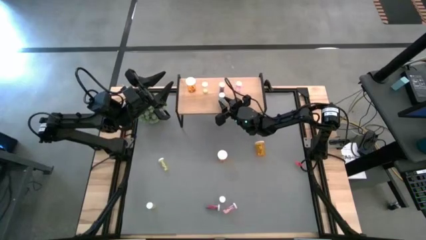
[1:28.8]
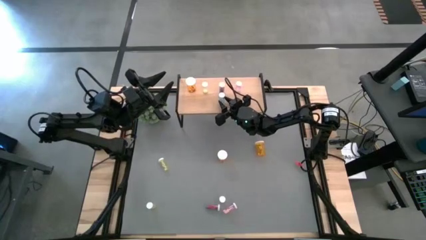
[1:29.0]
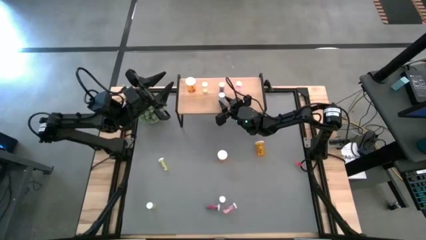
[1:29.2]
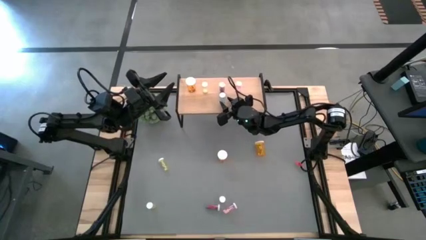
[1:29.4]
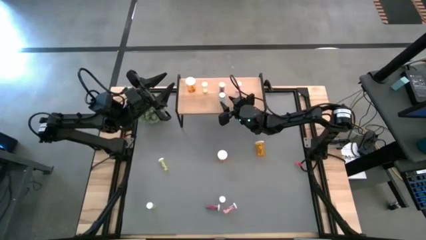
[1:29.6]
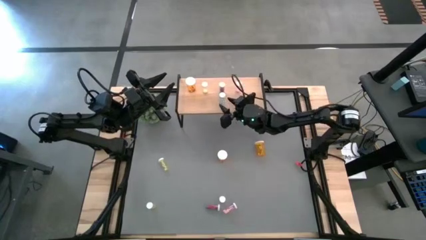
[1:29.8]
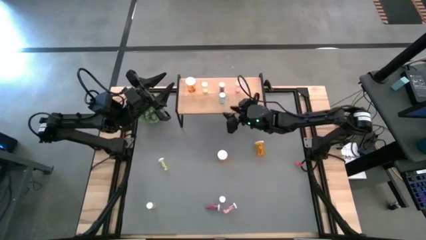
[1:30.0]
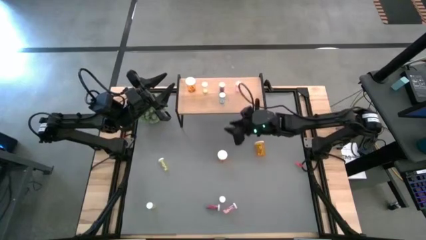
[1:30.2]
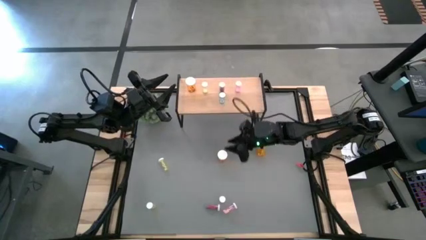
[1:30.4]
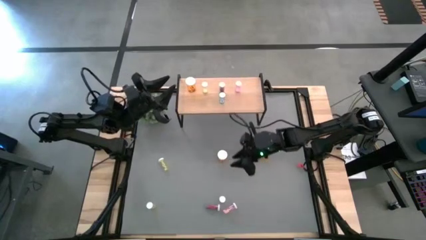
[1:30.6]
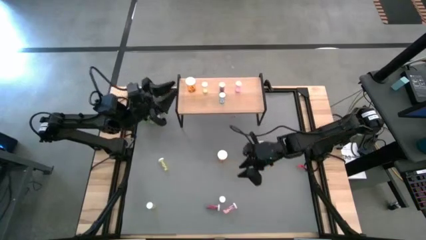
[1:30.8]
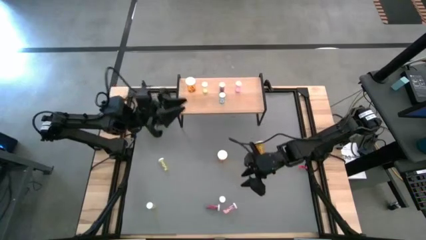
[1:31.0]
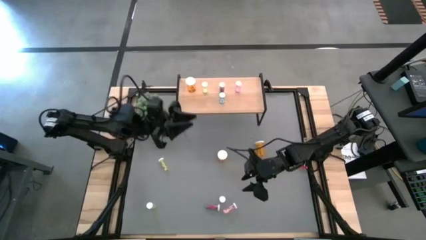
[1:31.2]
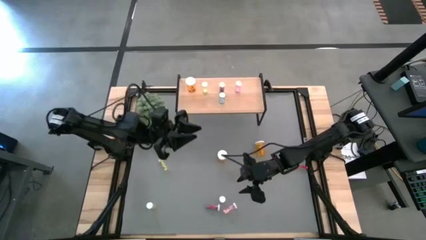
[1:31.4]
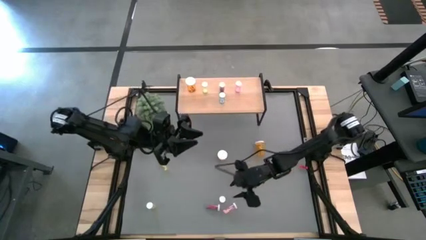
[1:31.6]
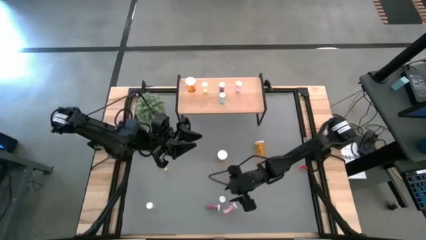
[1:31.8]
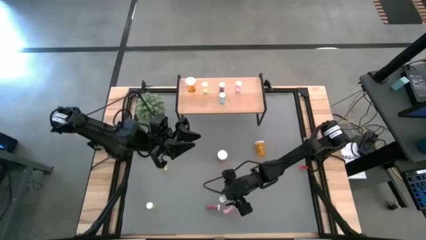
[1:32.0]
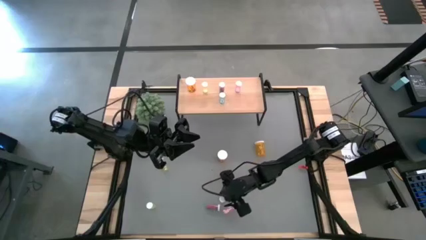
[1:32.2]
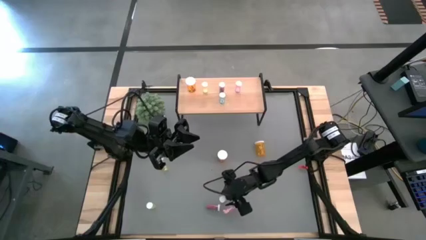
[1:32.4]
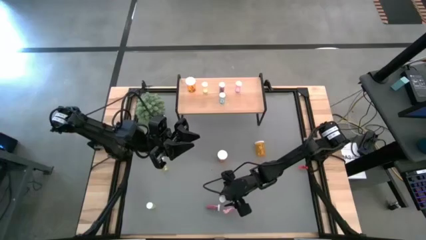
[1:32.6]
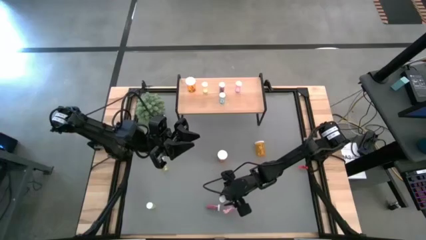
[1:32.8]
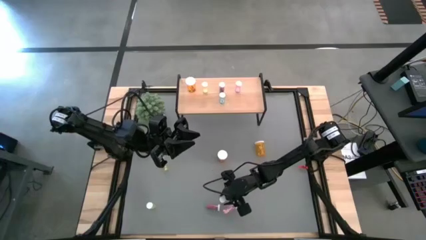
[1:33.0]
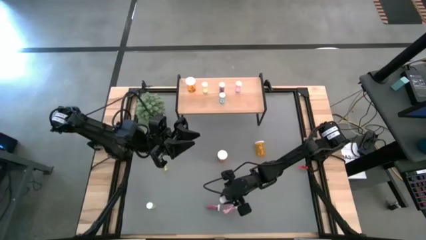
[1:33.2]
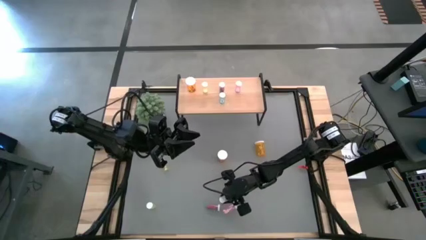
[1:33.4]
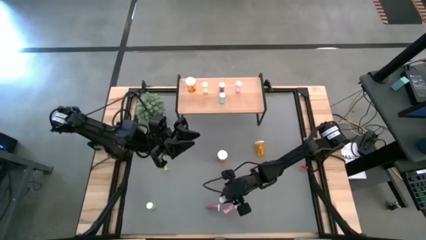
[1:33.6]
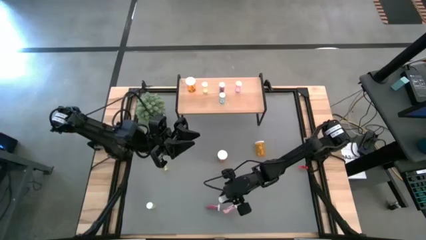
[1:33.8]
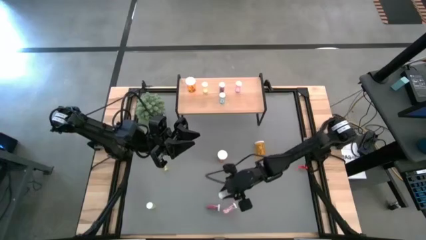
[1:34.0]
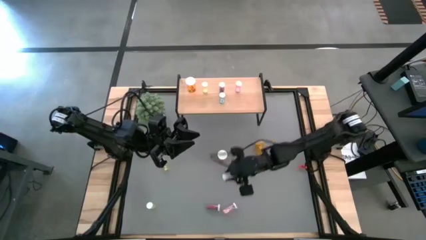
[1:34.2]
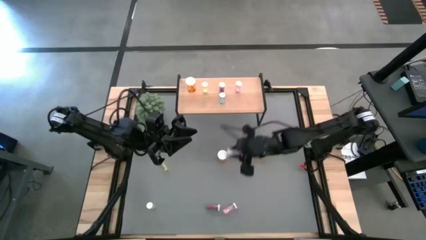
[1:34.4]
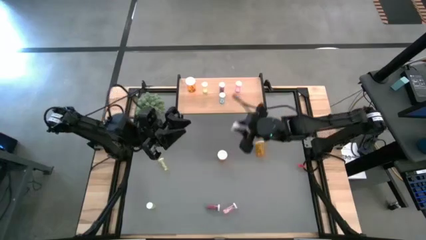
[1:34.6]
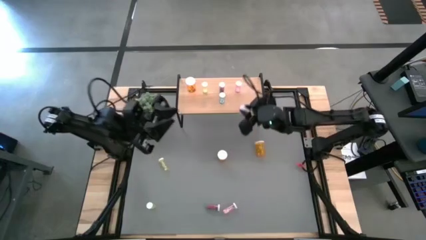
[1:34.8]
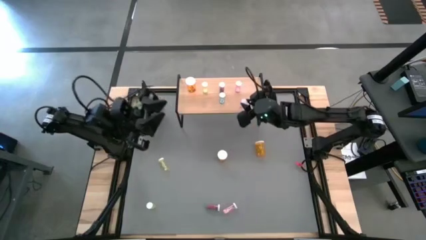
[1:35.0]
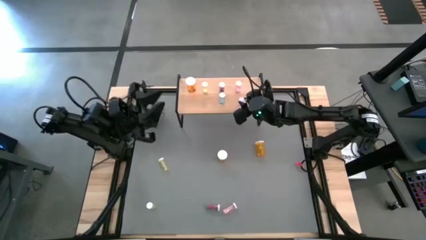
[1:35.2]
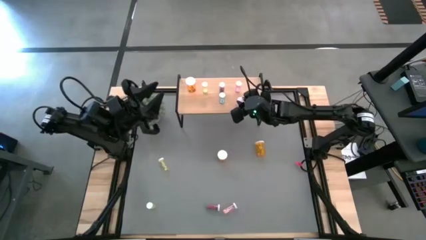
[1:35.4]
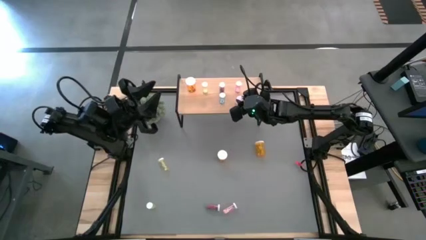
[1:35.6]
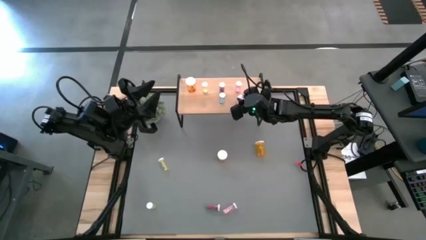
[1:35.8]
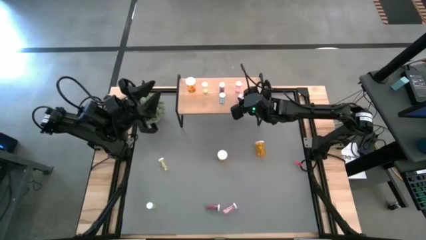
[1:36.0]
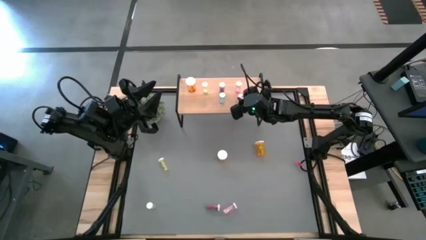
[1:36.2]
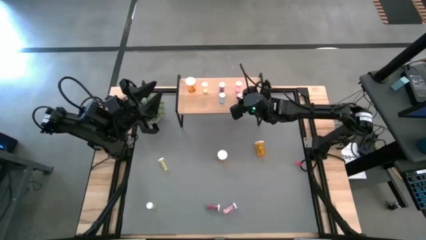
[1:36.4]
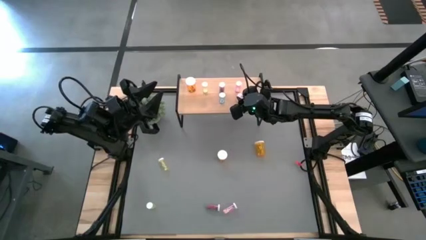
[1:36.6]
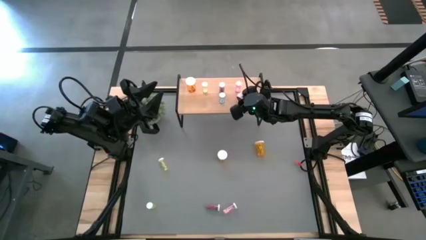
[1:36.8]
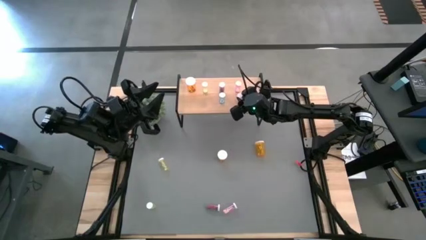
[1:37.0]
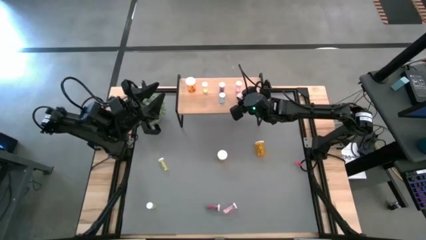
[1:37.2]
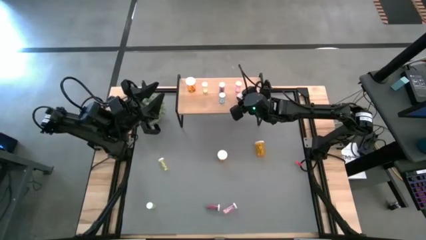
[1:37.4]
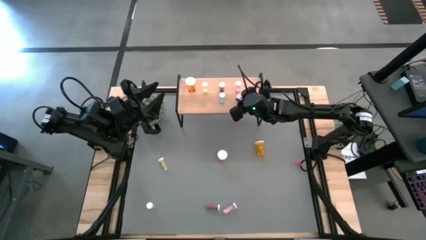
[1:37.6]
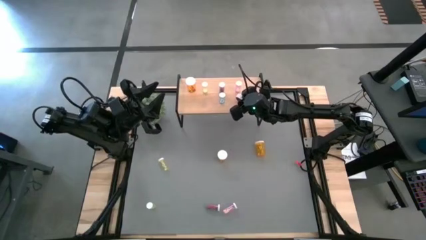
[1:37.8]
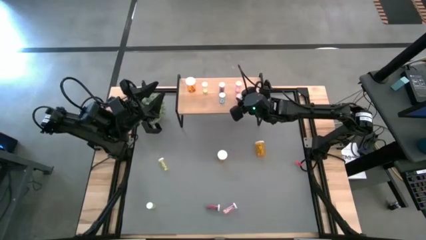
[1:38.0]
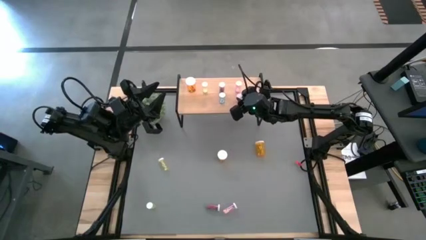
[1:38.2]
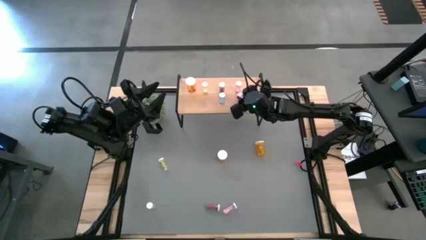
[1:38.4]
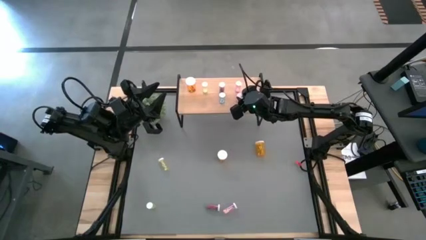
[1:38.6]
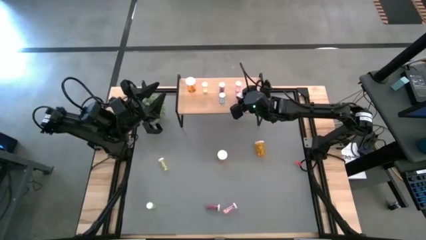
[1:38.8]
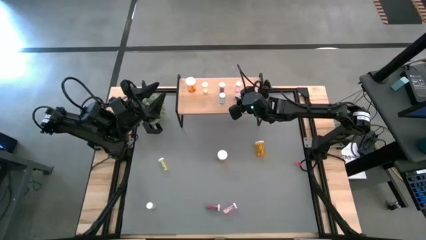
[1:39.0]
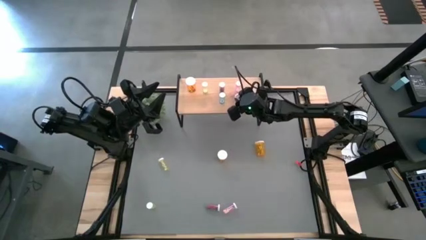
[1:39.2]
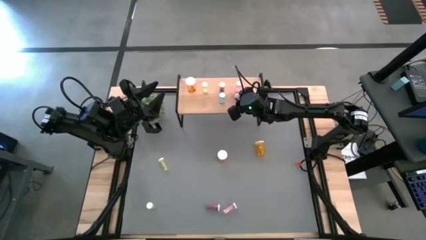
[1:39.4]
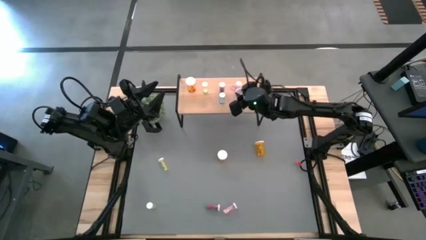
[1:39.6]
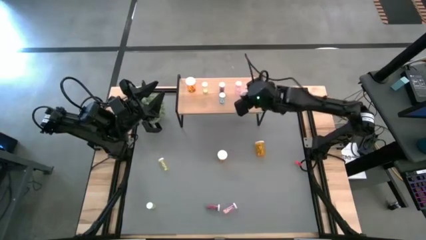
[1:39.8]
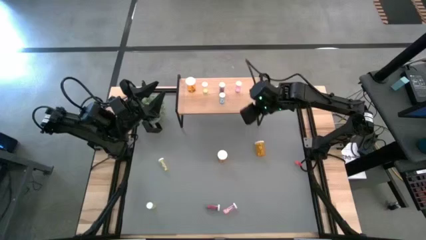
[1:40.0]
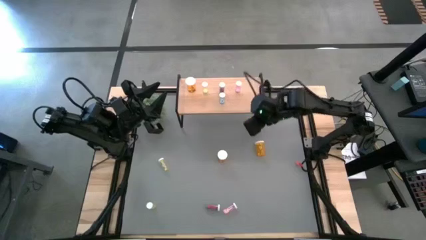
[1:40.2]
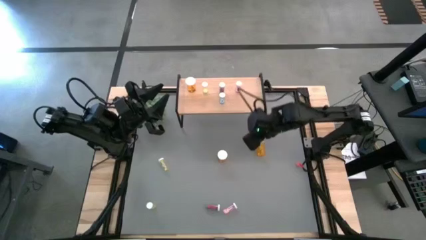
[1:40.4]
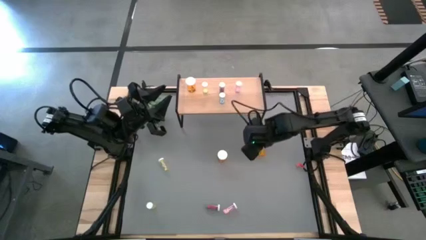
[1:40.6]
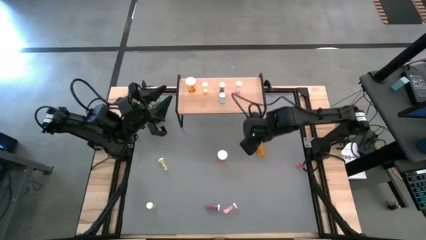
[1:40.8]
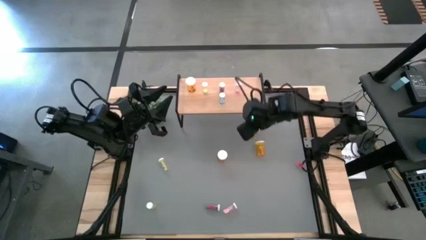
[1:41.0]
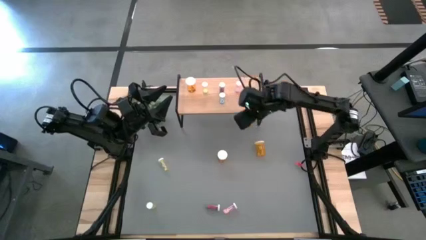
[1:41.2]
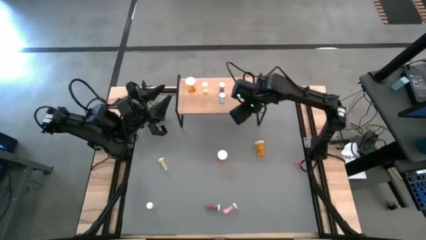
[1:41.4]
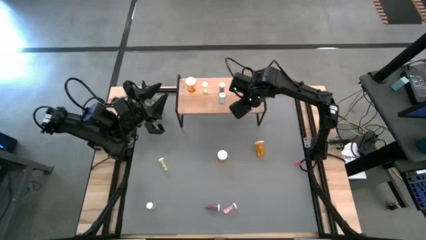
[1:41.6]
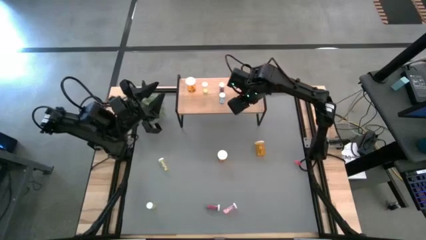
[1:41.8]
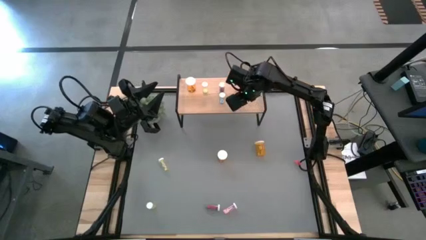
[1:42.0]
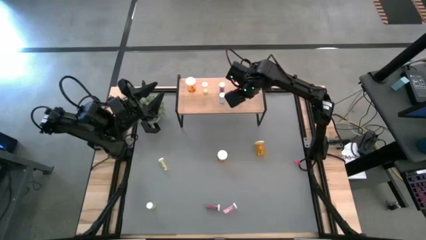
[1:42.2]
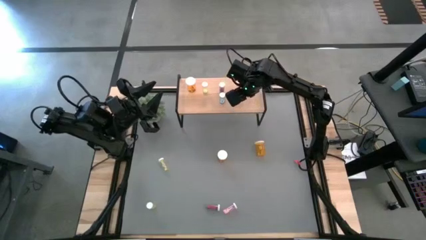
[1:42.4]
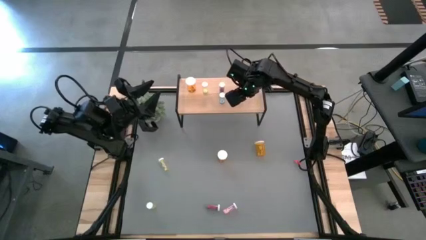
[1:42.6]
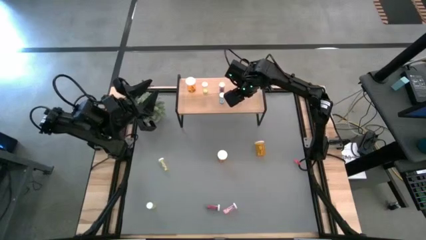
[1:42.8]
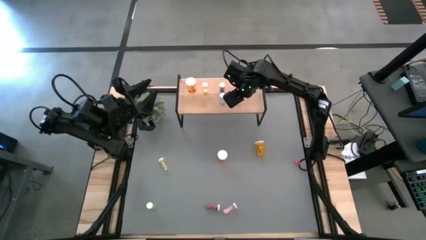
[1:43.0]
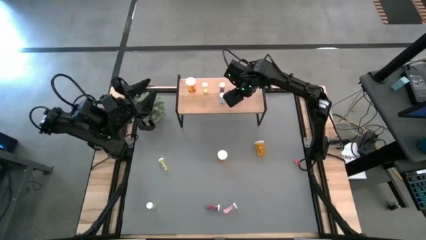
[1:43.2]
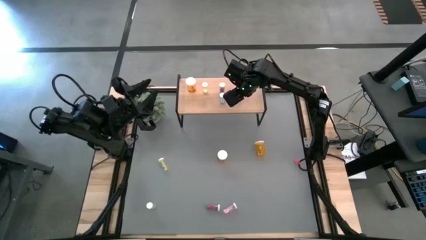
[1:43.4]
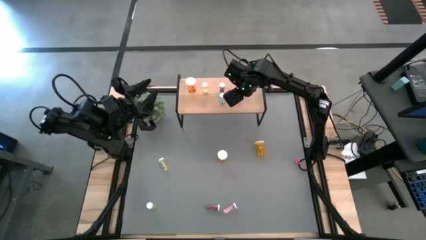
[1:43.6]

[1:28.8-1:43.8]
Task: Pick and place medicine bottles onto shelf by color
Put the top pink pill bottle on the shelf aligned with the other pink pill bottle
